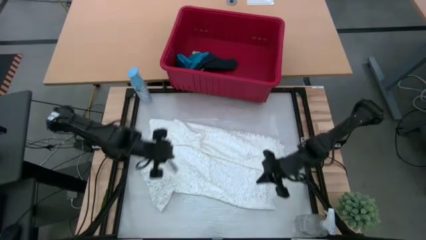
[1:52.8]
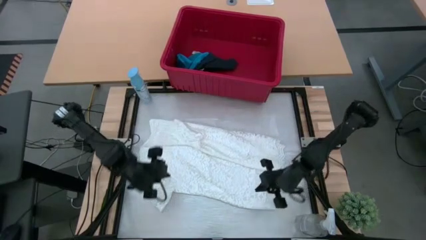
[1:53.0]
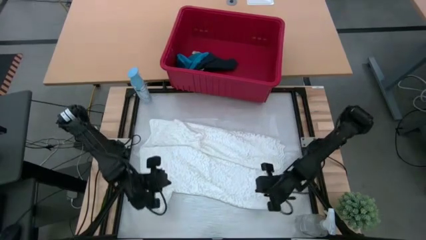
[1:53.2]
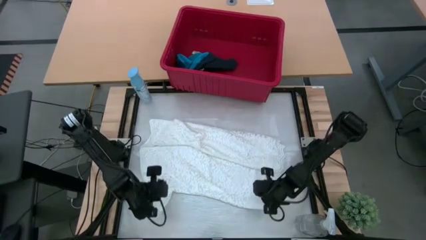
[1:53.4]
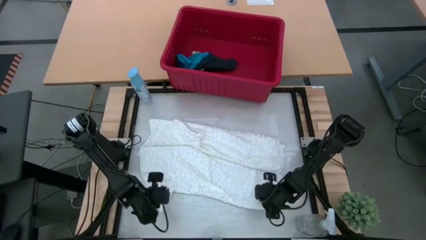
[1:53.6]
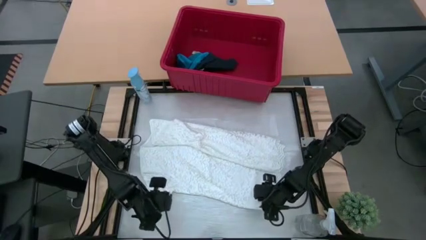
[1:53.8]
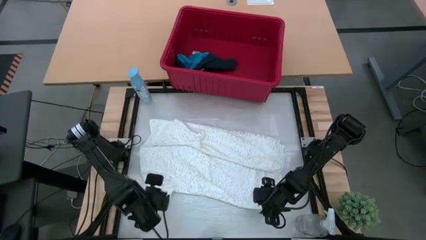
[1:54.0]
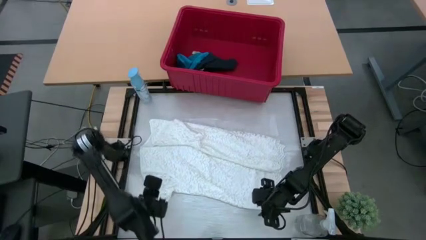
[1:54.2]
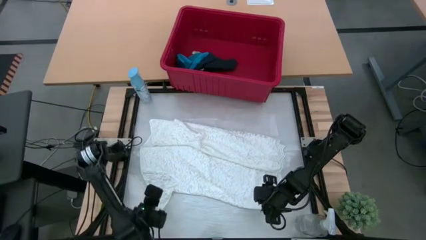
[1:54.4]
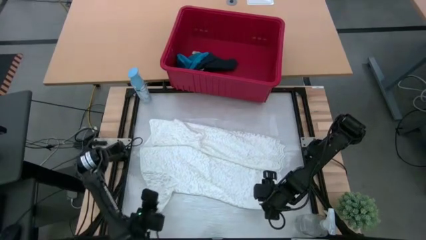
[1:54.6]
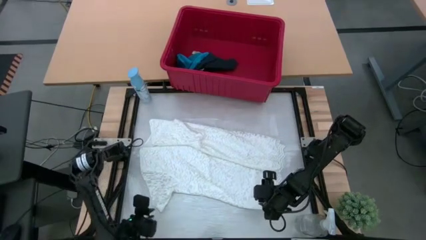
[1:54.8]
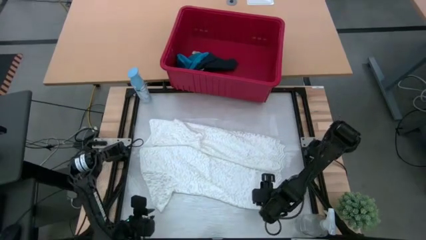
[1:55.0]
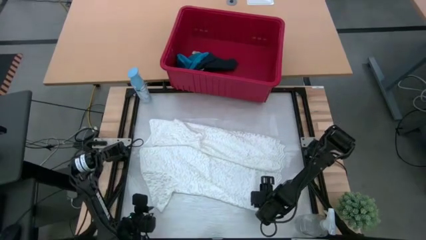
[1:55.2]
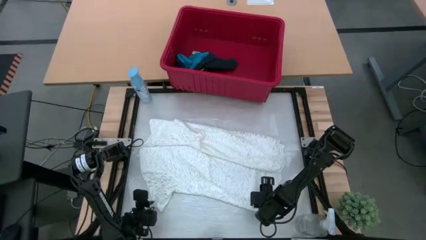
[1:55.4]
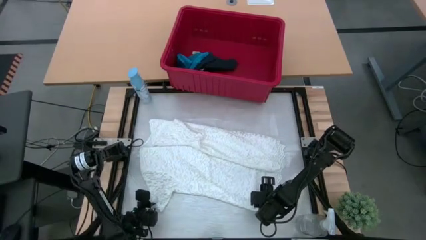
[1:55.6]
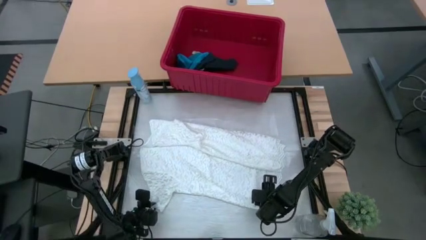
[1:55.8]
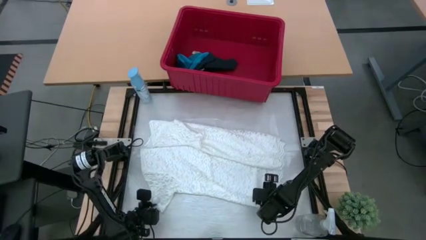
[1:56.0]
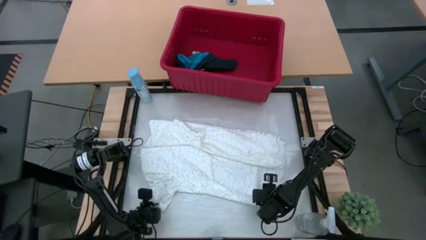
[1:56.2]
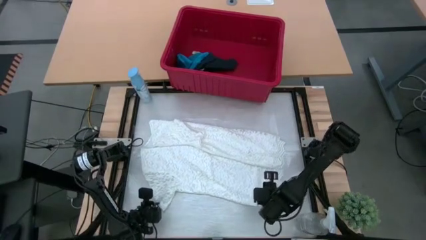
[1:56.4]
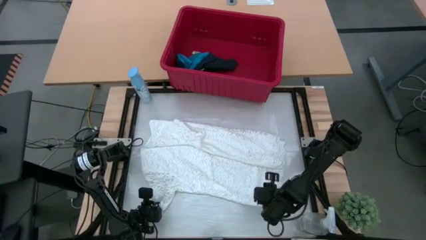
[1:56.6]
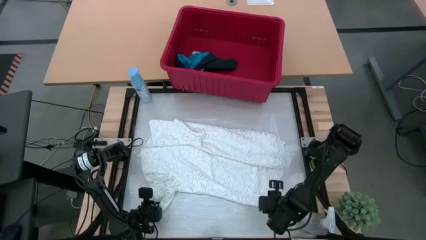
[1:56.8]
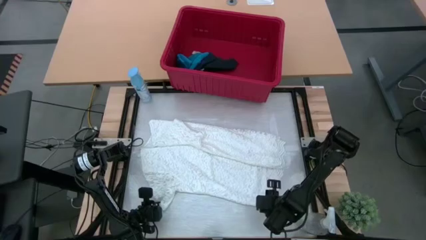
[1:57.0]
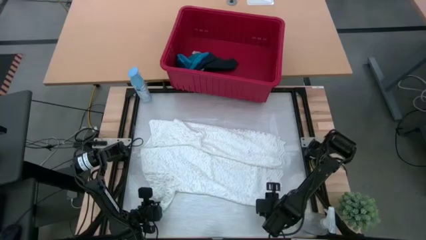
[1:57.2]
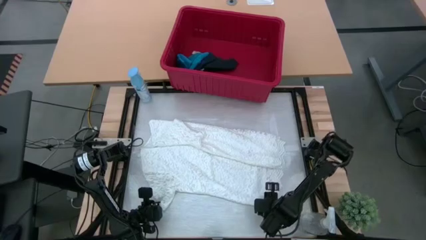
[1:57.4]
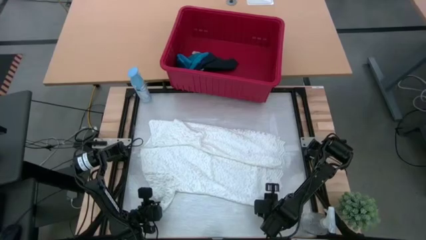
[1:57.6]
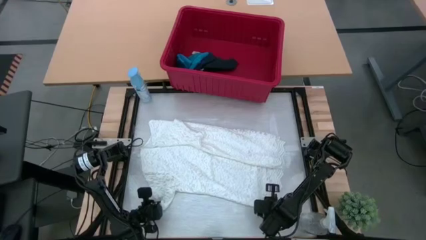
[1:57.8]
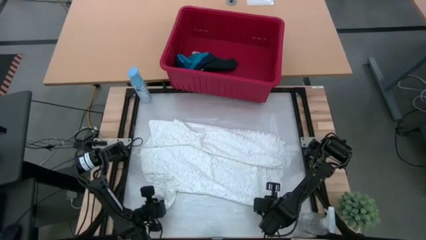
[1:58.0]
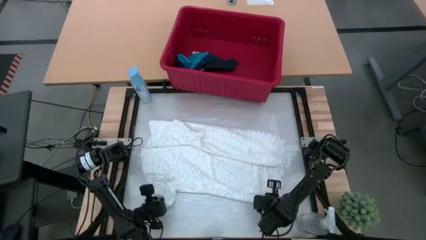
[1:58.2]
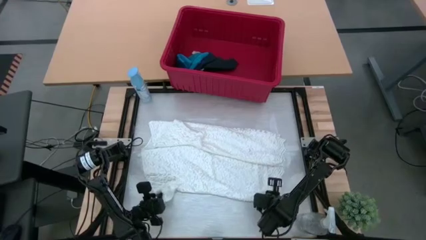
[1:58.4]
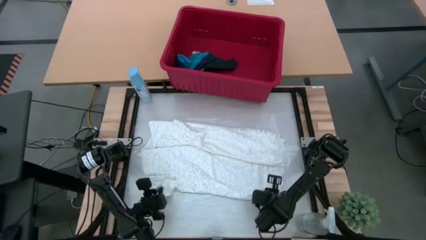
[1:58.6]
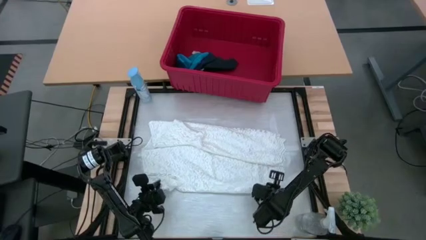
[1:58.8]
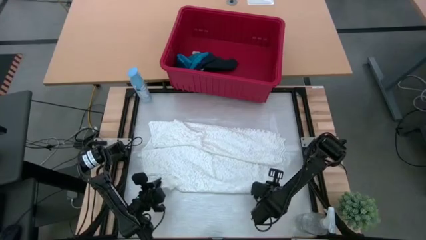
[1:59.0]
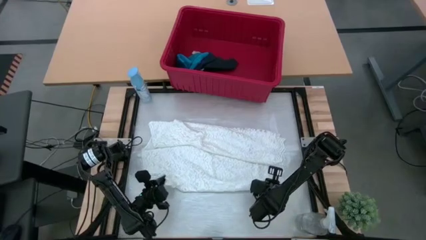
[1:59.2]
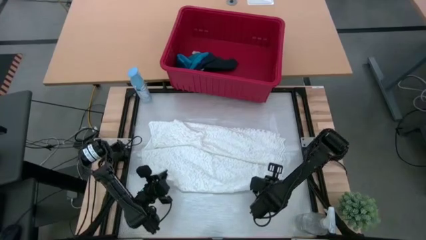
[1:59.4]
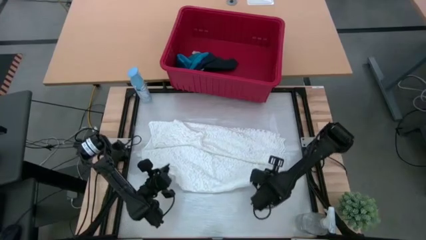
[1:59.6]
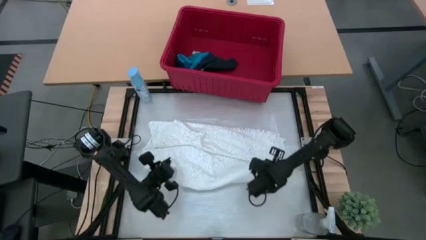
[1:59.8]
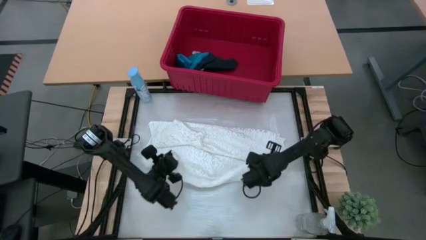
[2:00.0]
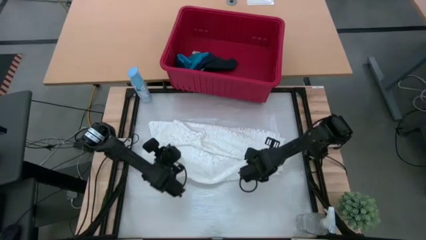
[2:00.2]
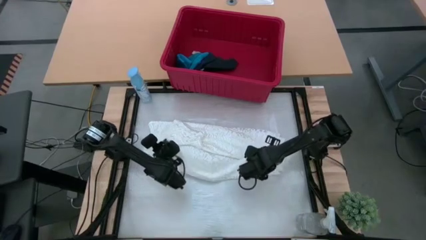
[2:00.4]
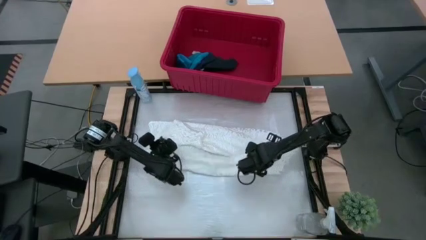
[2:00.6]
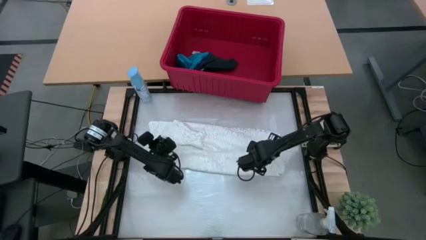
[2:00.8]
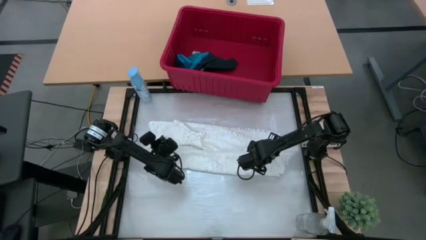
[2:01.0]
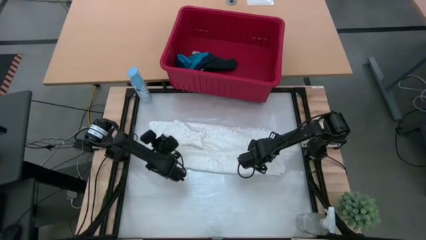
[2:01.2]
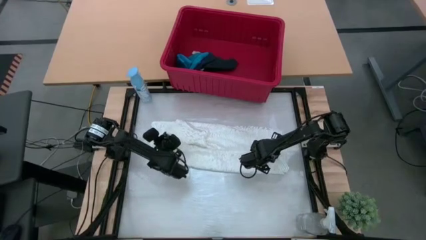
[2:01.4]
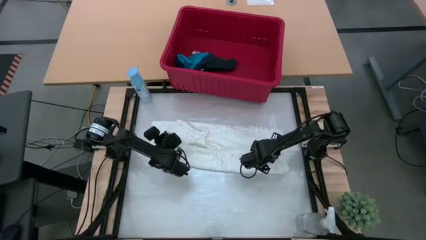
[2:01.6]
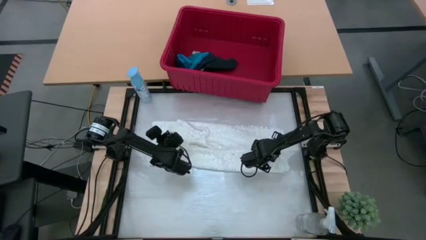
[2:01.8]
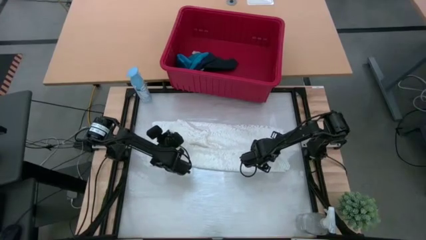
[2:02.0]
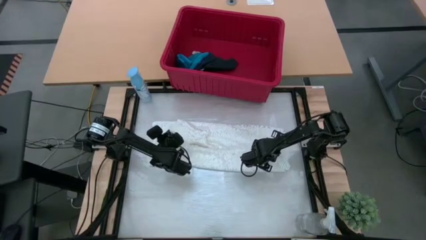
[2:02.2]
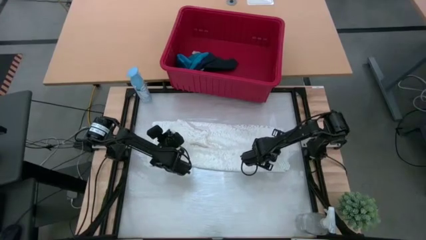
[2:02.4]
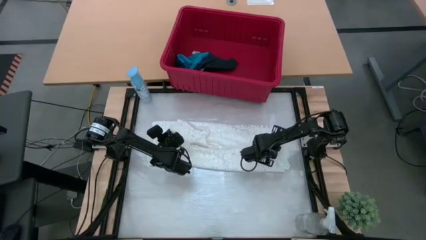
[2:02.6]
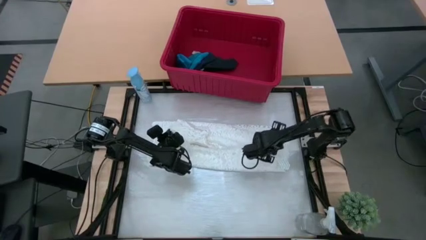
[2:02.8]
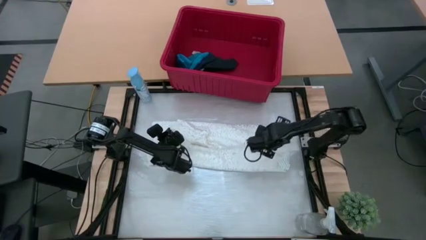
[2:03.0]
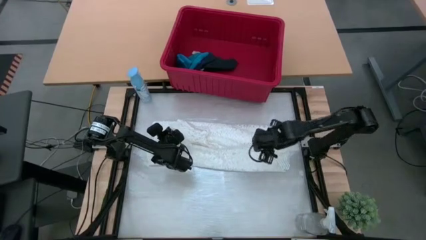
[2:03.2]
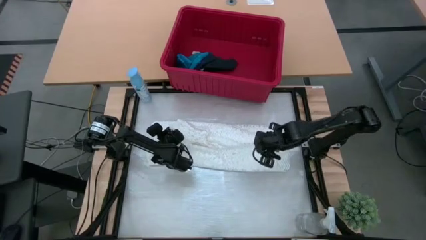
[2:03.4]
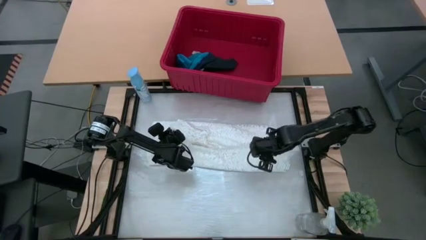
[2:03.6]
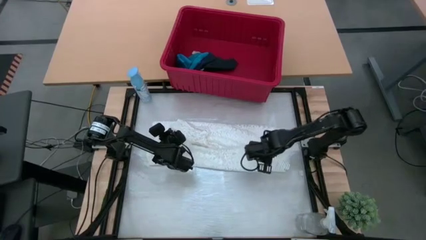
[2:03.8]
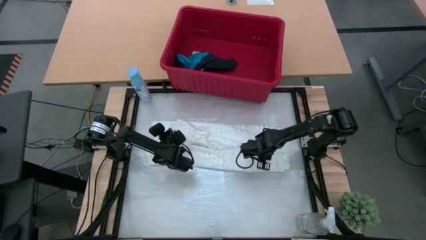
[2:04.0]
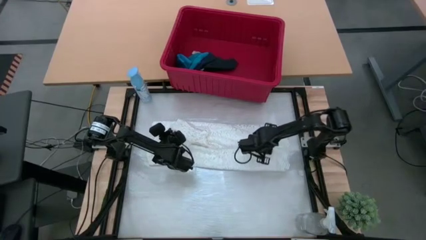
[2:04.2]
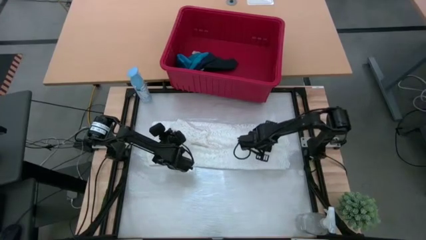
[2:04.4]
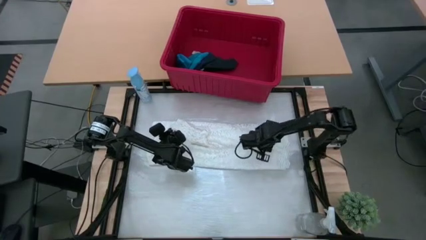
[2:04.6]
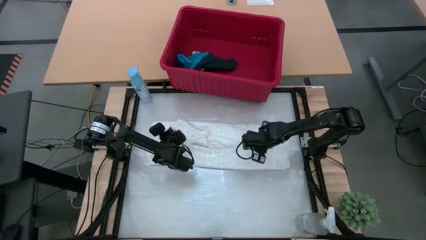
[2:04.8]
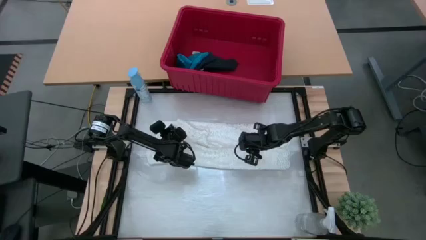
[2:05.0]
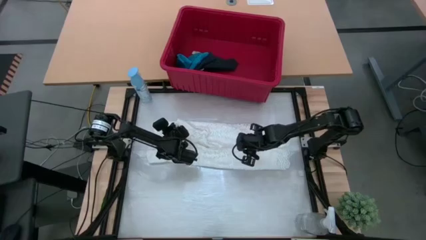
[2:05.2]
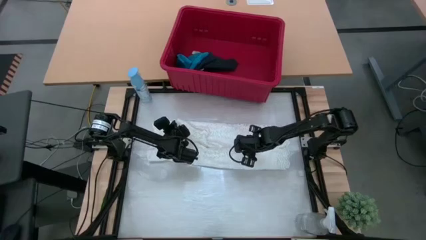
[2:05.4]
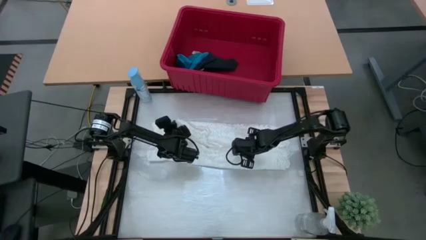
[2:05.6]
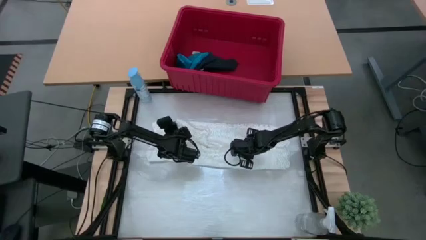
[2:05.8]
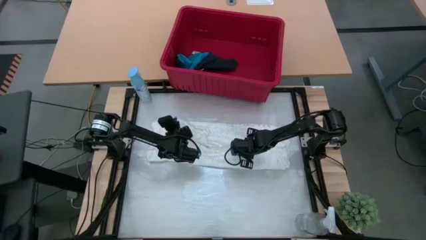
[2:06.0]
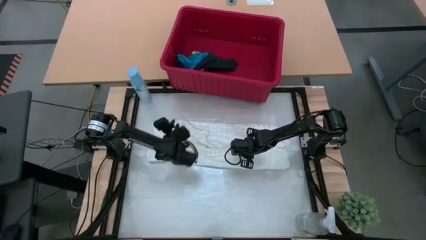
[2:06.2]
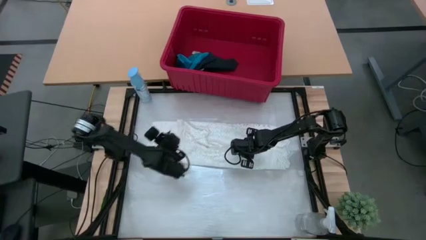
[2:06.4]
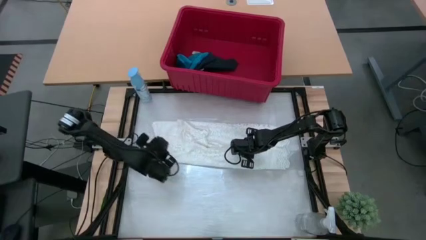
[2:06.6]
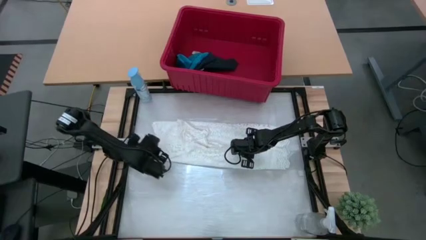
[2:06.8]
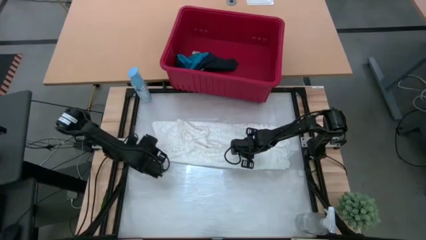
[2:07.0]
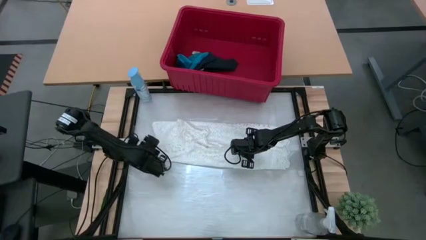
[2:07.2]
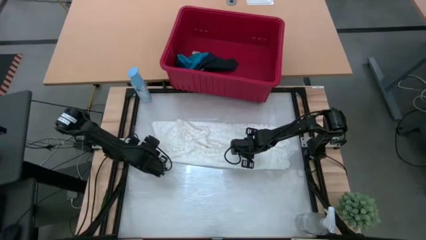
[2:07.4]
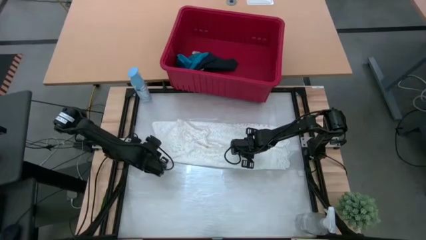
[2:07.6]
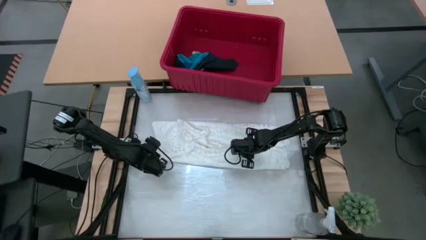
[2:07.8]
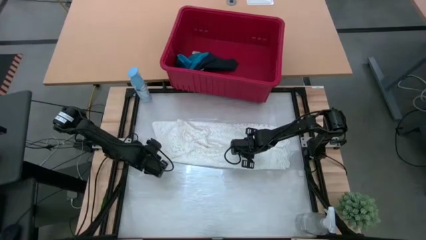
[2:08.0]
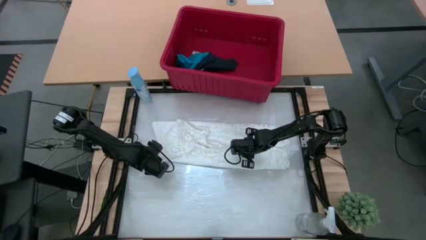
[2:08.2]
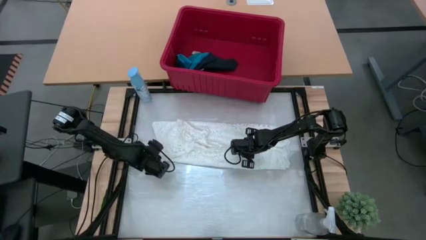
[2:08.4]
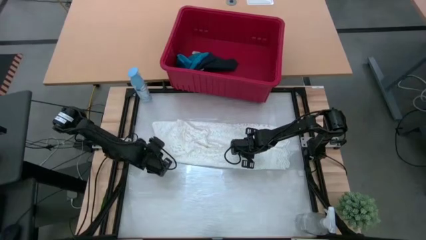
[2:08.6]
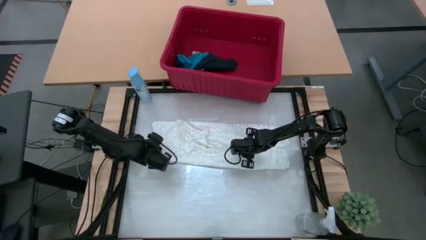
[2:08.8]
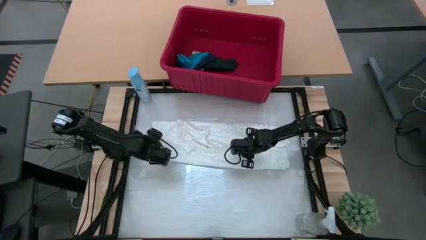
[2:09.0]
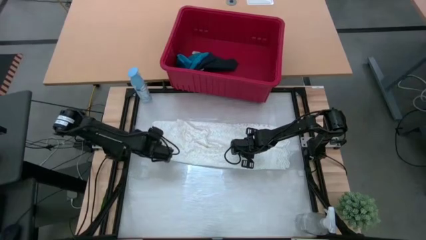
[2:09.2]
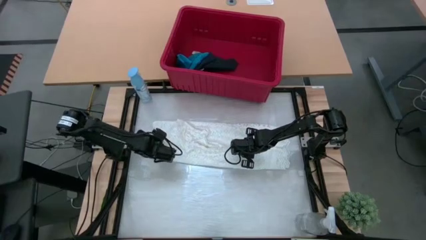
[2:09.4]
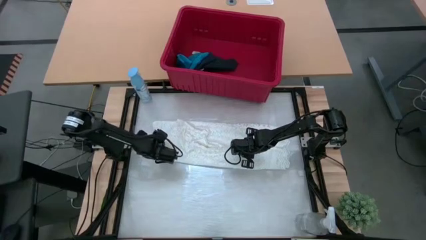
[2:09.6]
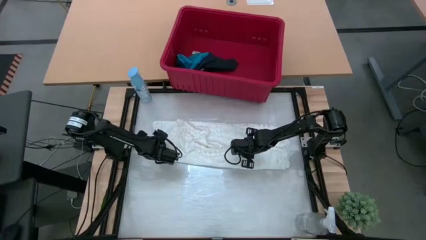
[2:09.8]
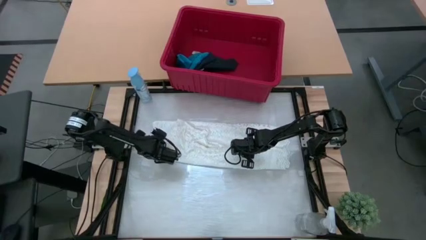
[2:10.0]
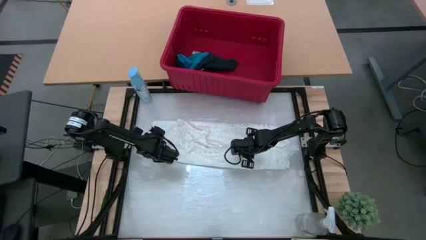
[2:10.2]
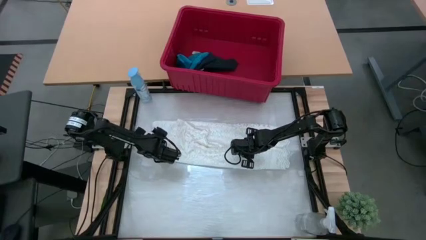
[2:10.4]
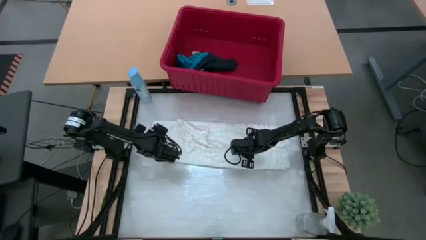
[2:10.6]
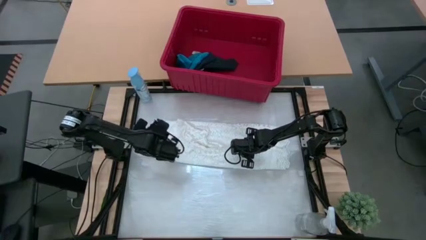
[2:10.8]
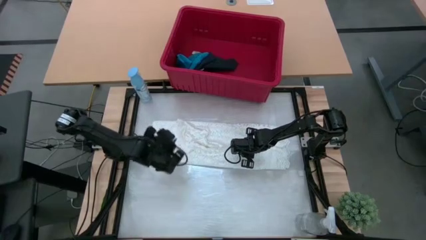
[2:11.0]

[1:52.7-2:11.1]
Task: Fold Laundry from Bin
Fold the white shirt
